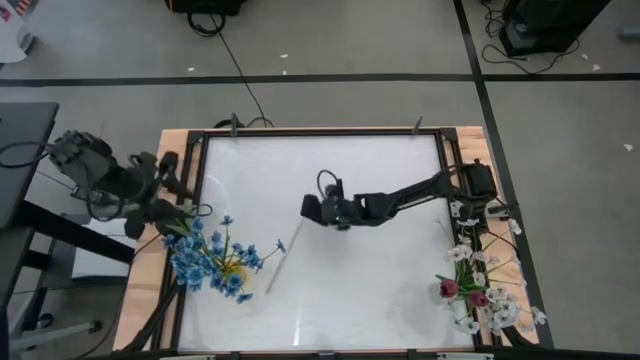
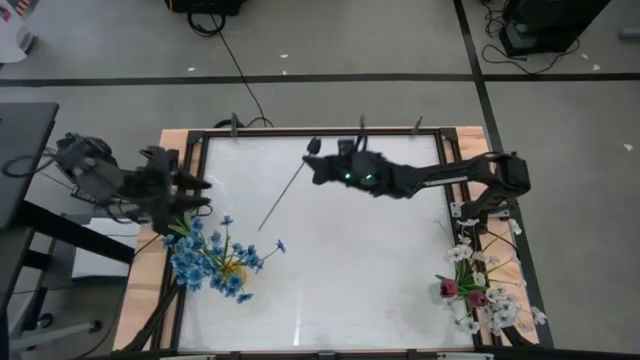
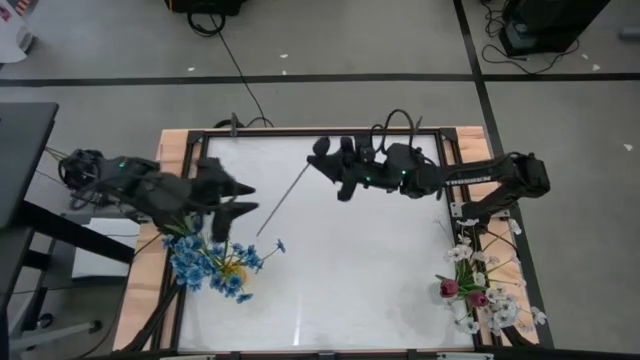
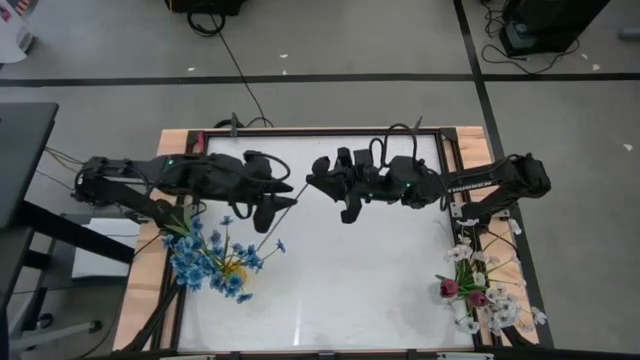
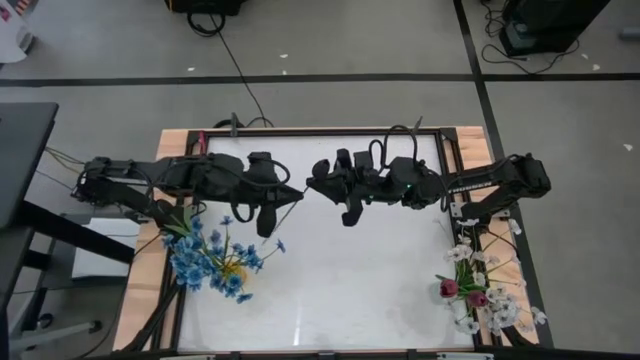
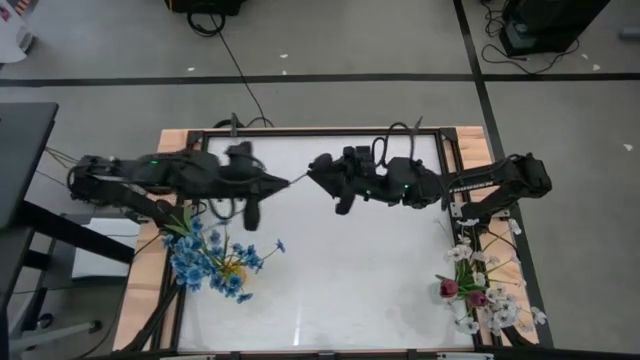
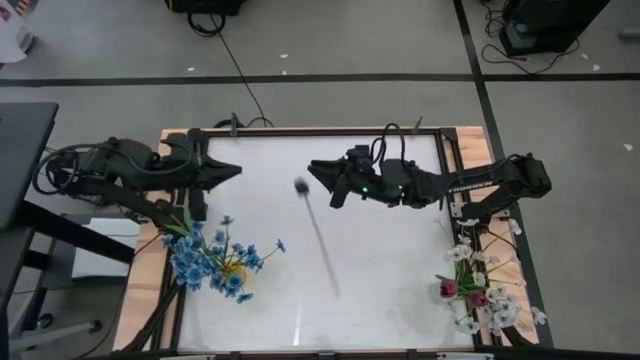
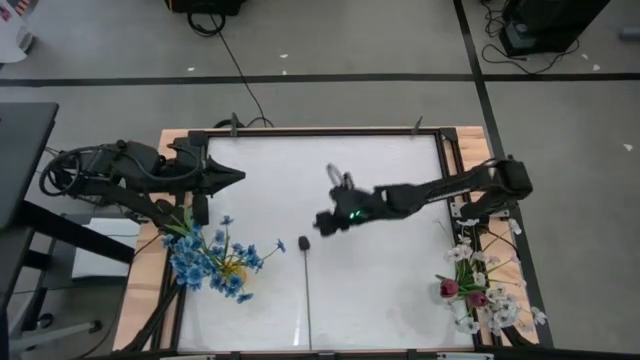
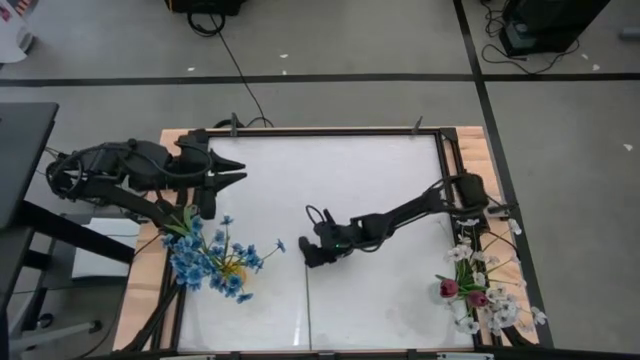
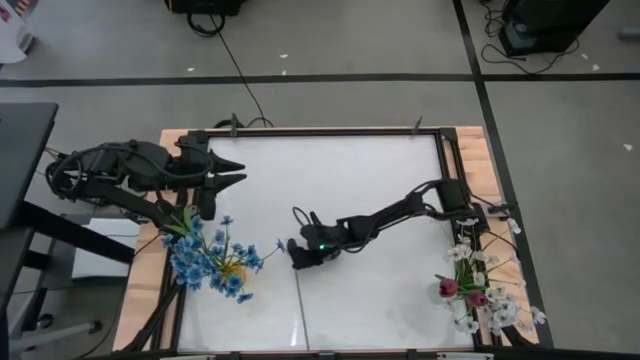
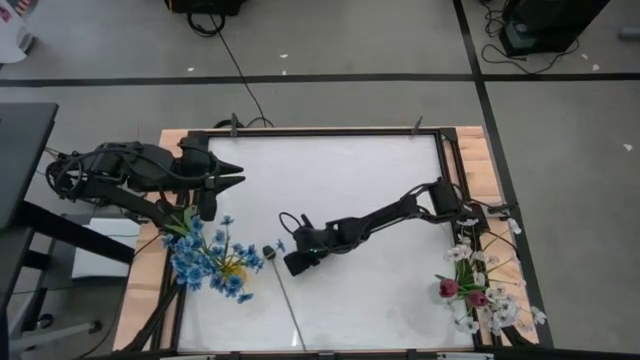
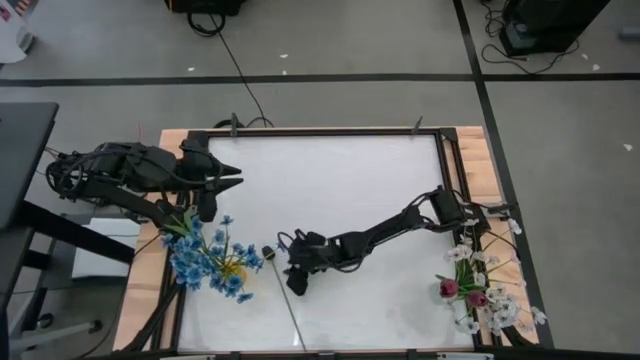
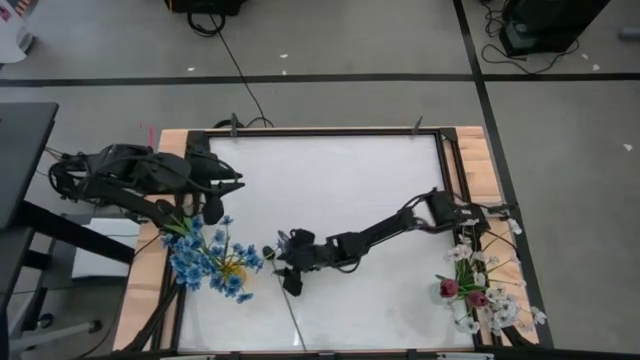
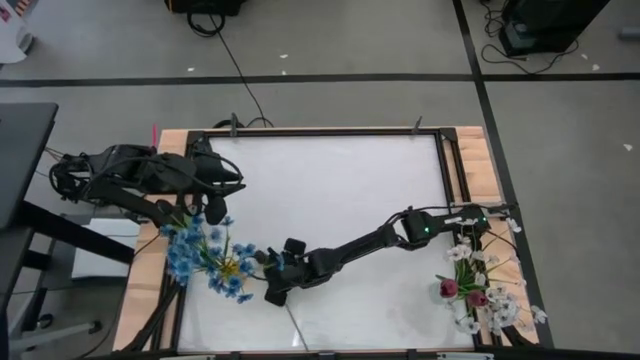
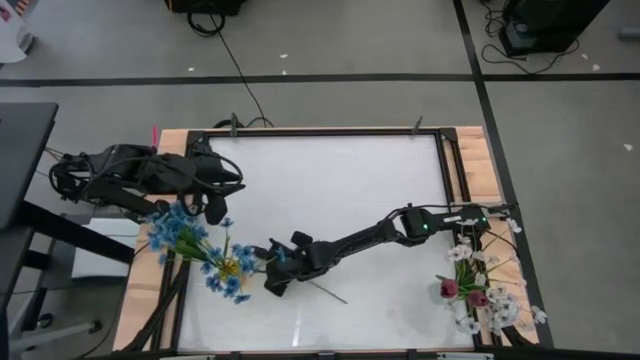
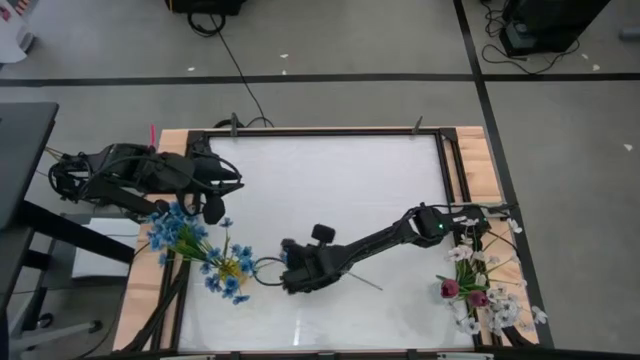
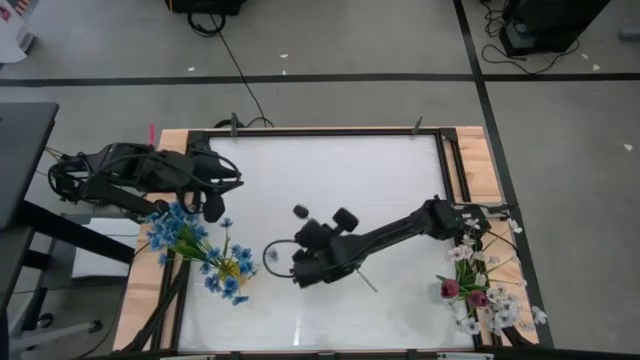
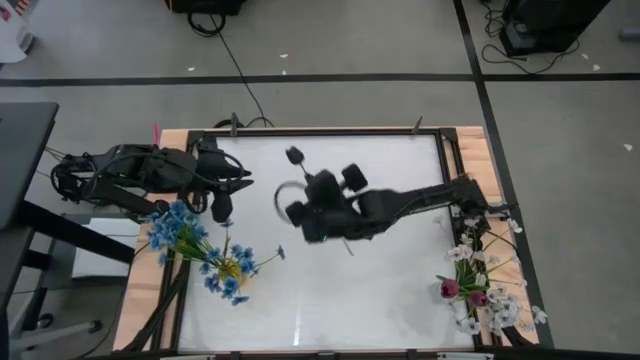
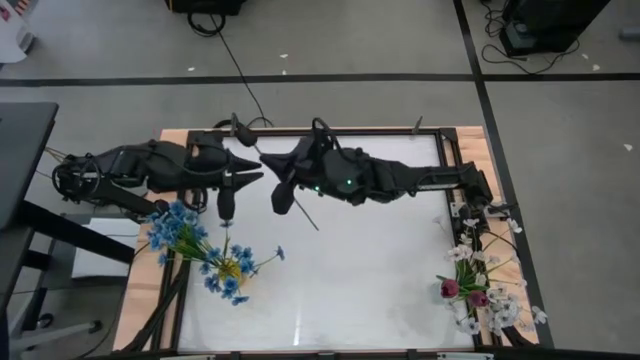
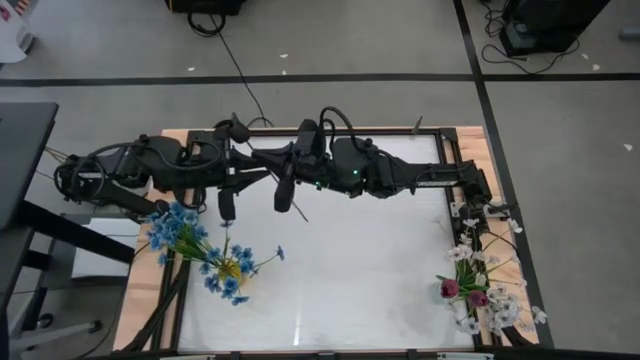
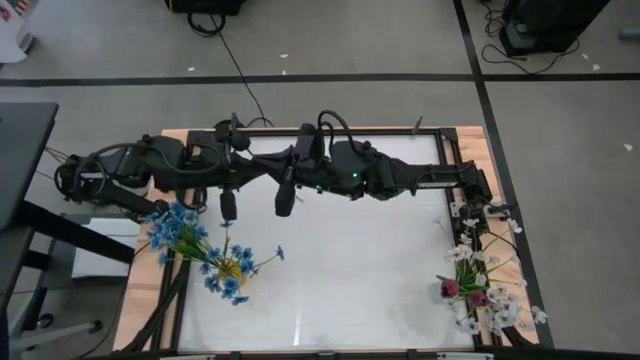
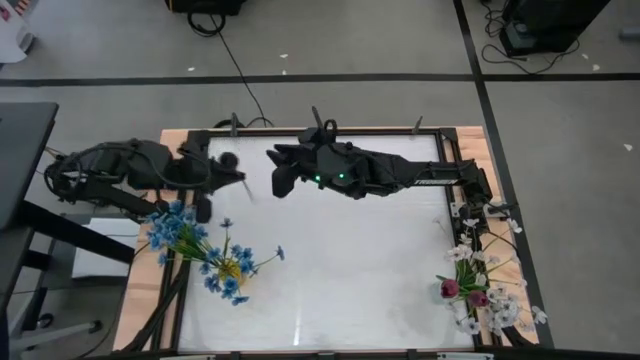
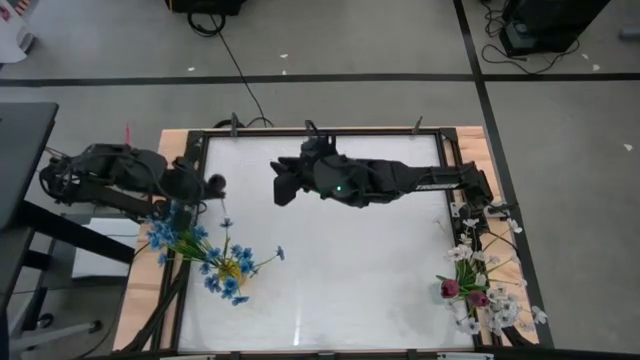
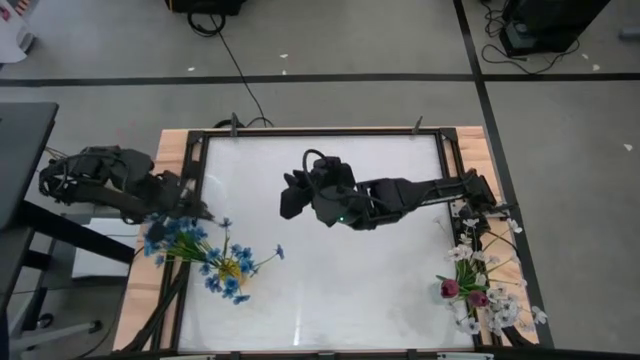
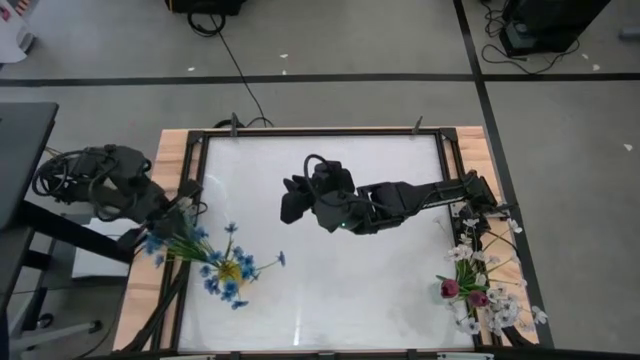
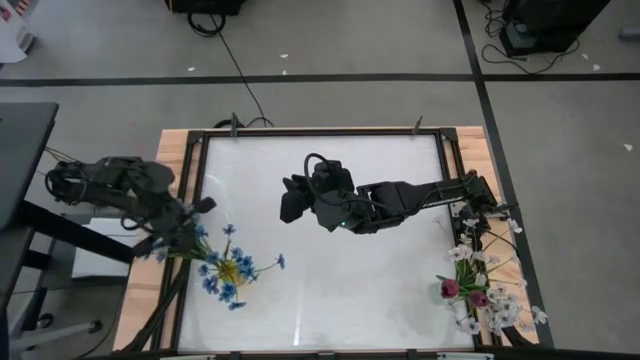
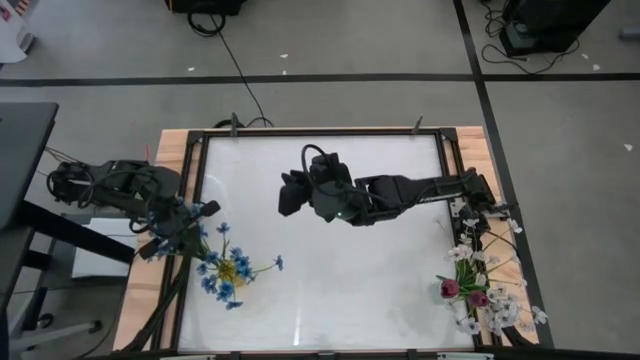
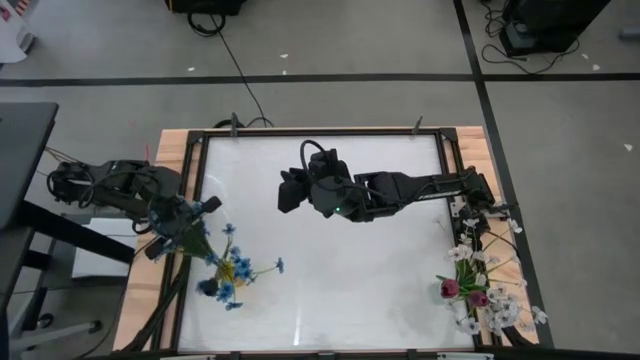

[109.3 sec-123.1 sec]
Task: Sort flowers into vase by color
Put the black tulip into the yellow vase

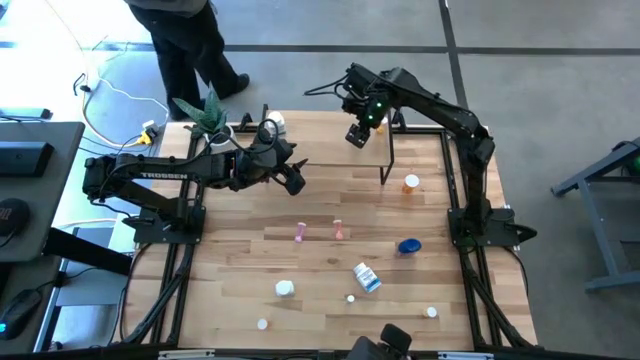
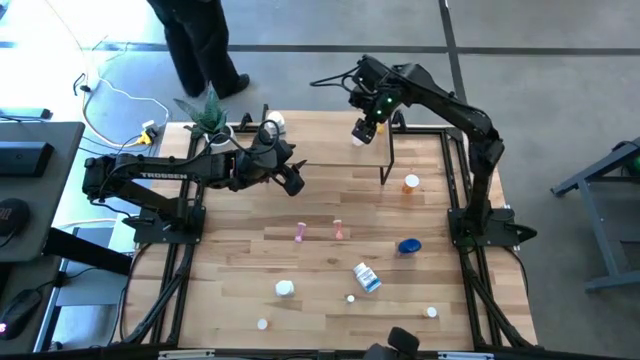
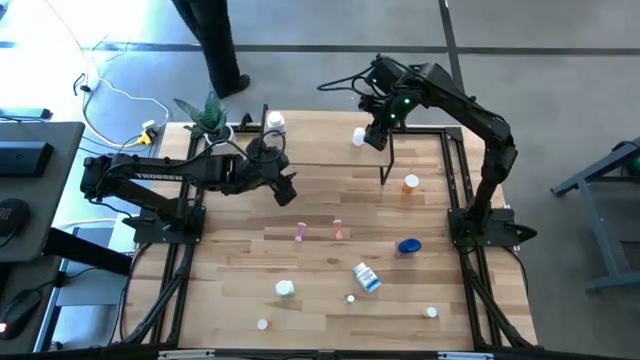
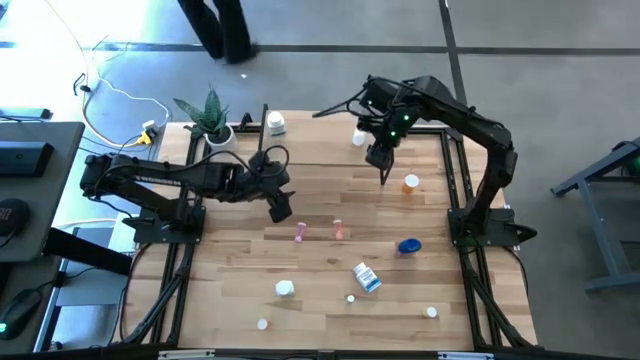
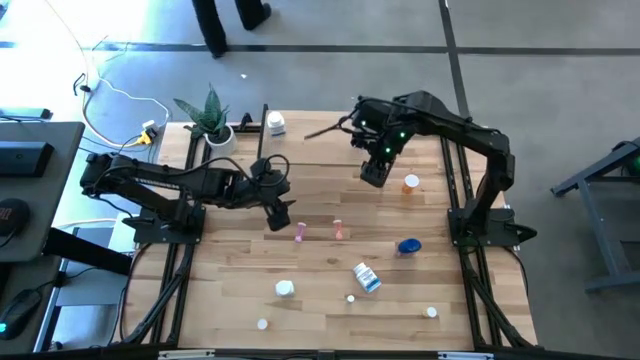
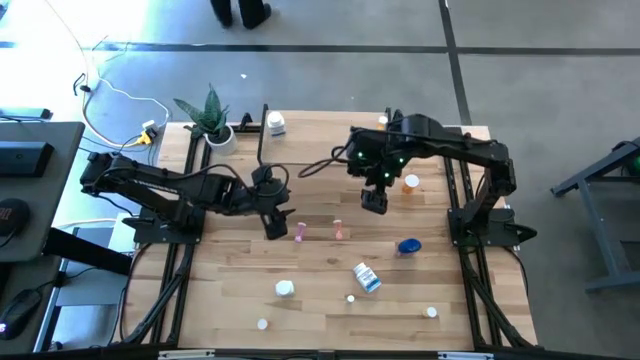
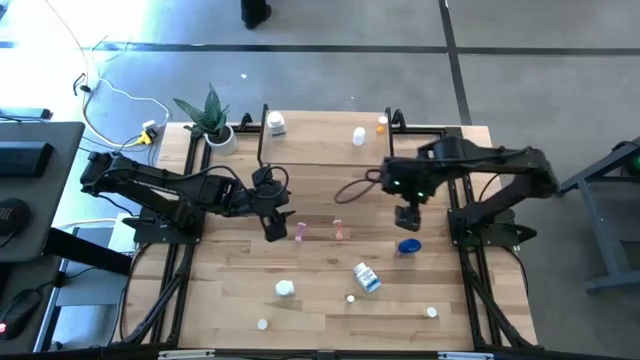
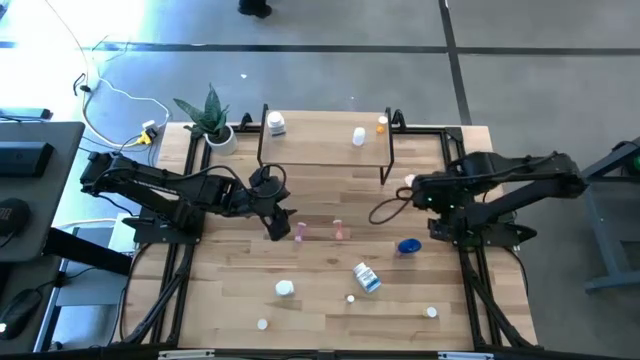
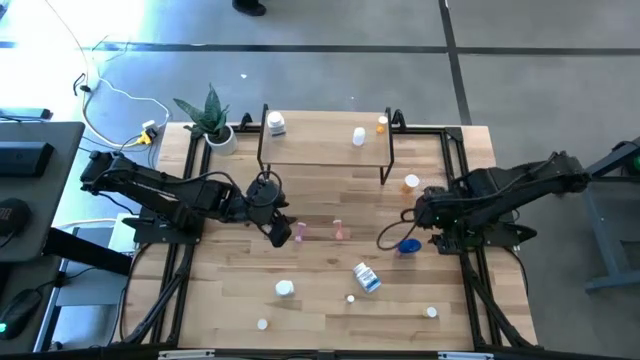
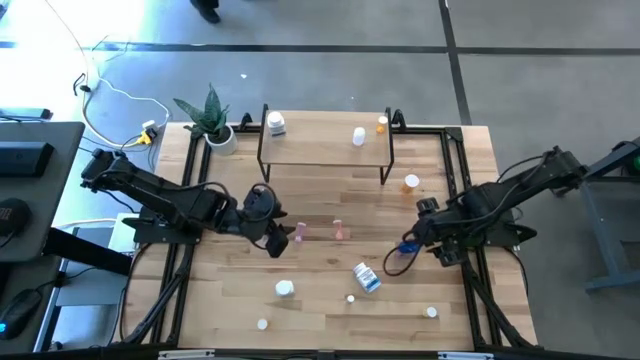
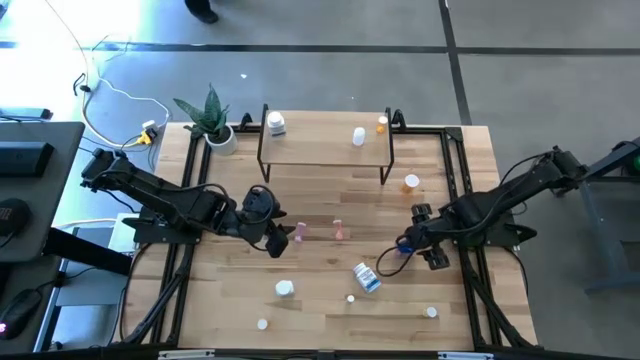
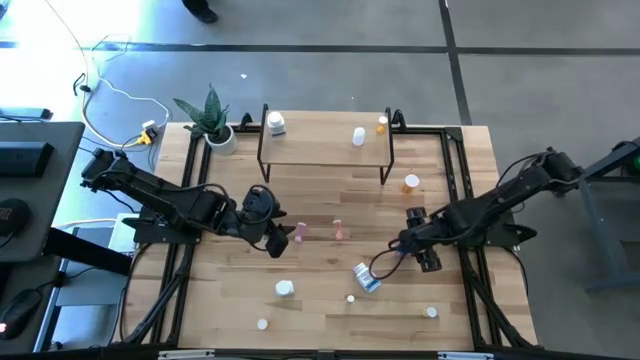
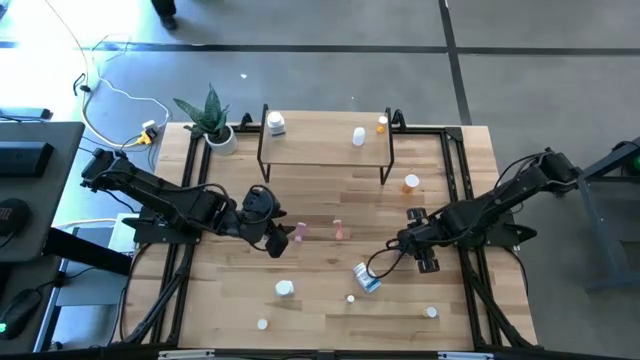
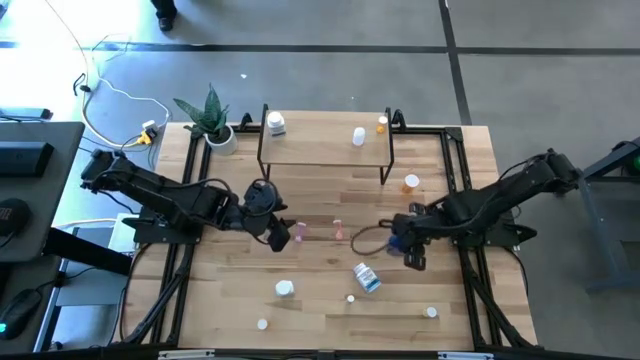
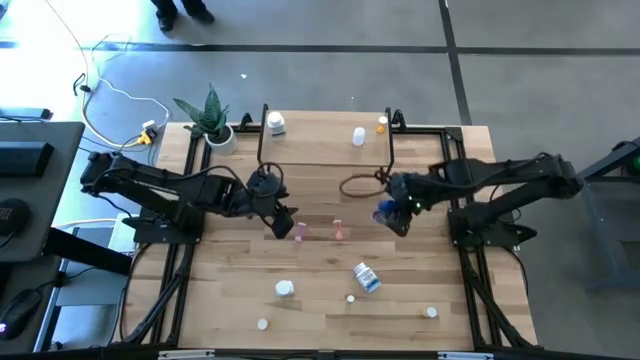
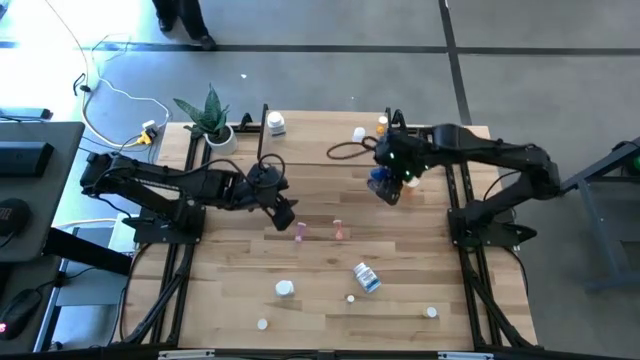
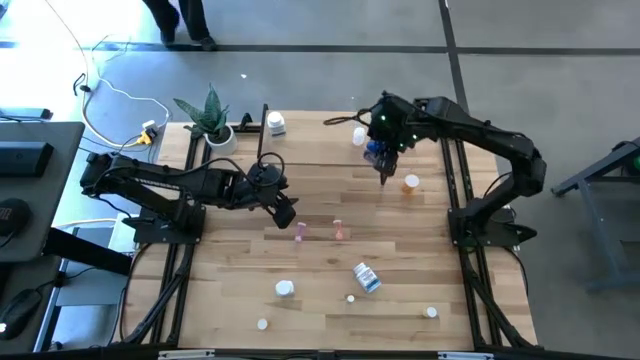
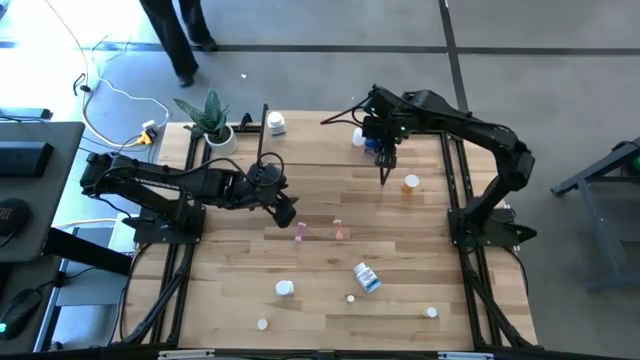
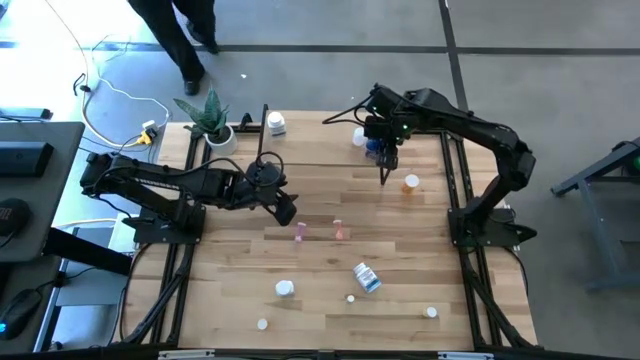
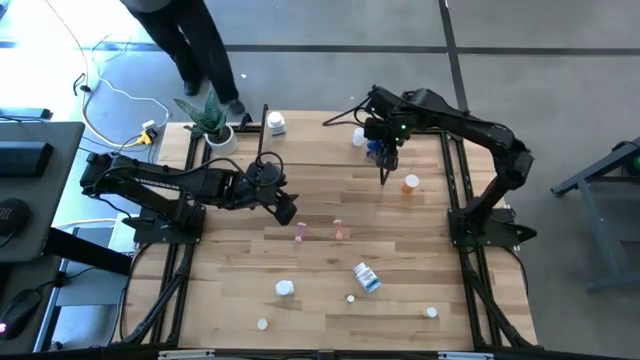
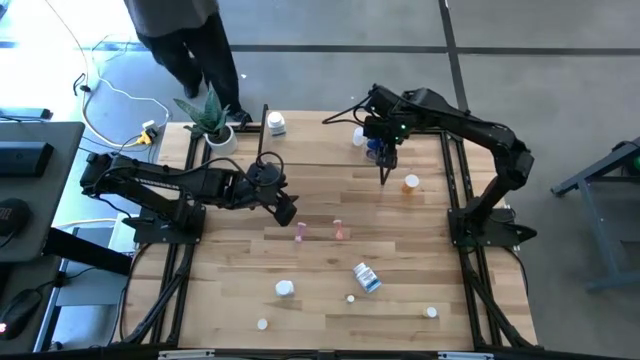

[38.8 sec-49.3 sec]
Task: Pick and place medicine bottles onto shelf by color
Put the blue pill bottle on the shelf
